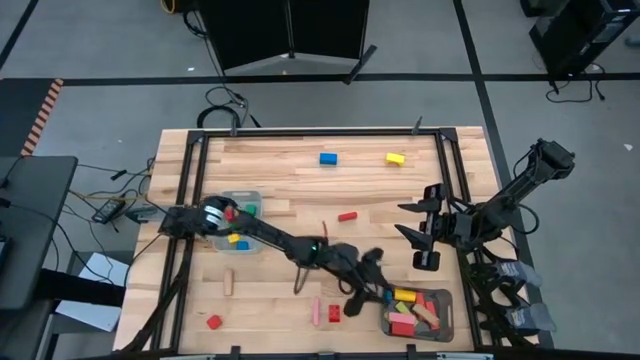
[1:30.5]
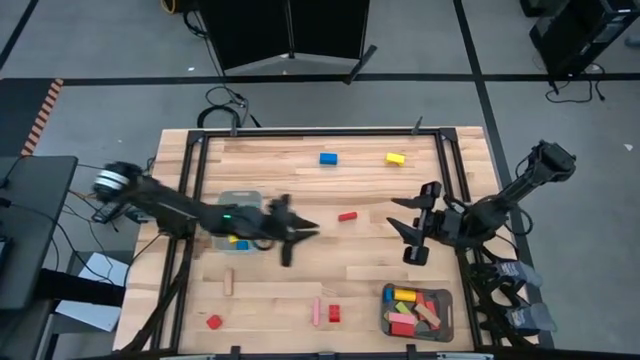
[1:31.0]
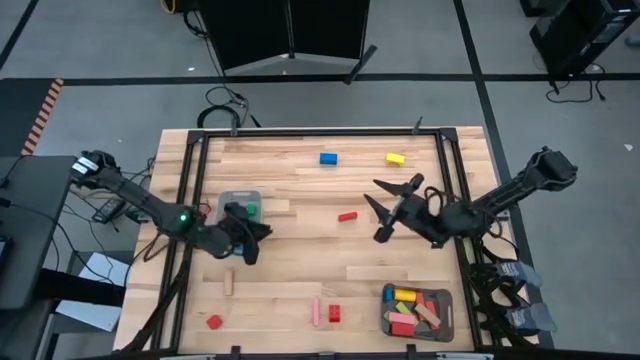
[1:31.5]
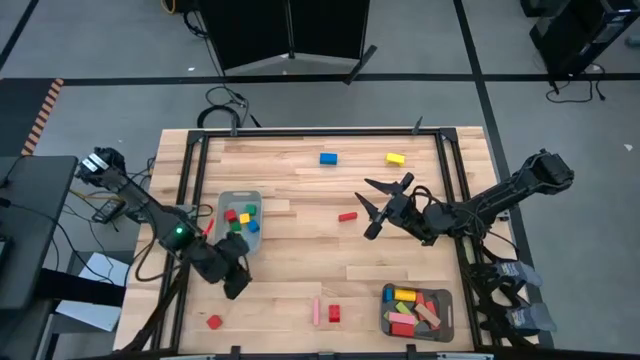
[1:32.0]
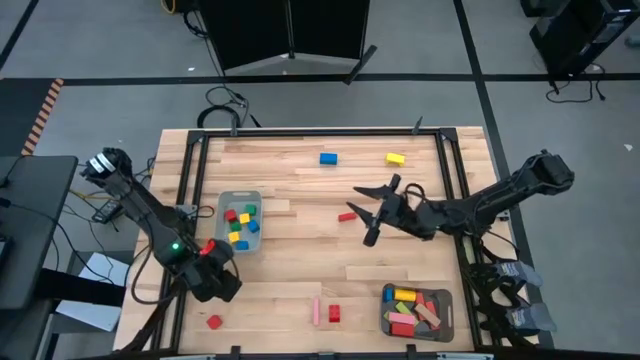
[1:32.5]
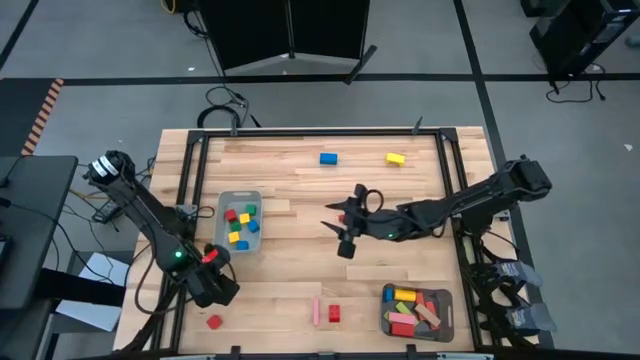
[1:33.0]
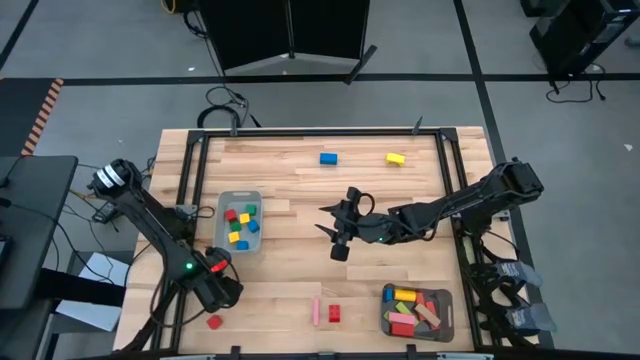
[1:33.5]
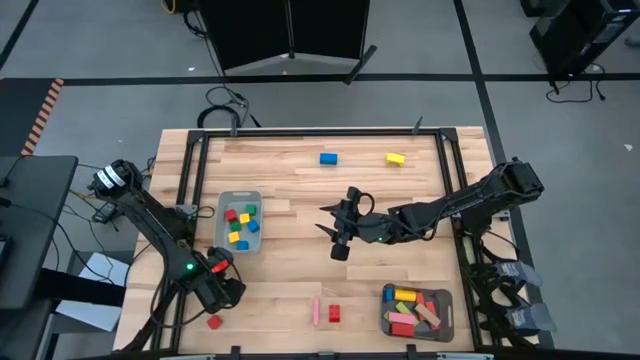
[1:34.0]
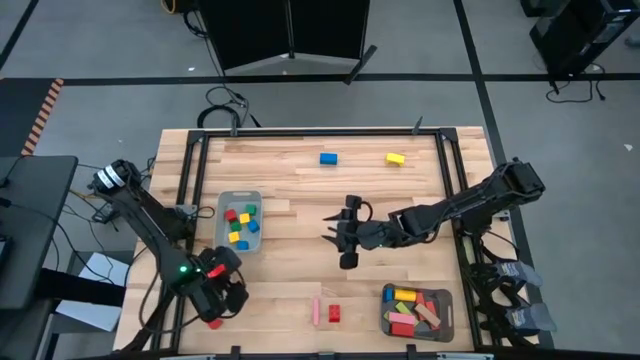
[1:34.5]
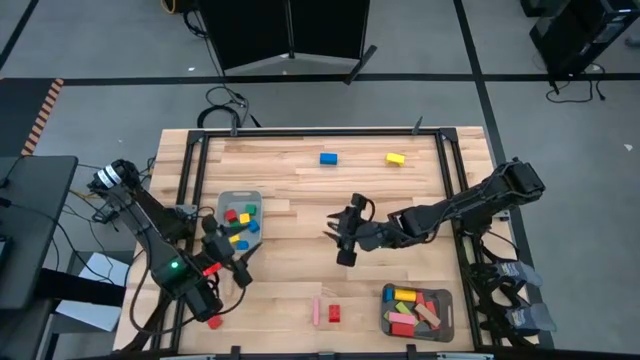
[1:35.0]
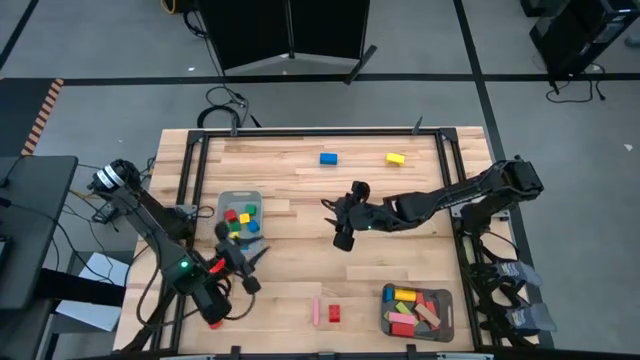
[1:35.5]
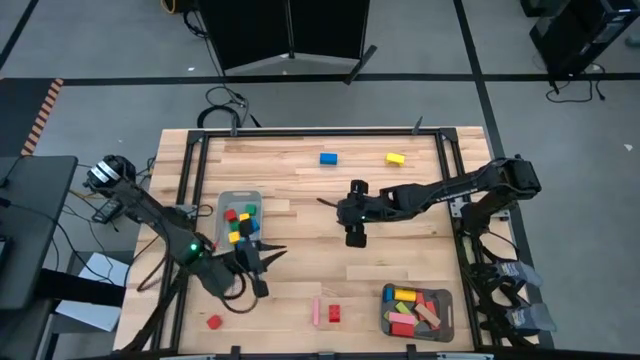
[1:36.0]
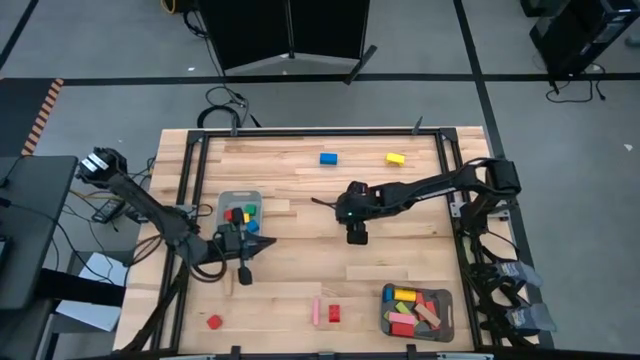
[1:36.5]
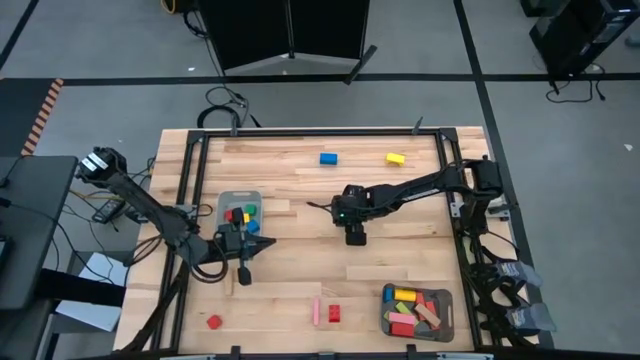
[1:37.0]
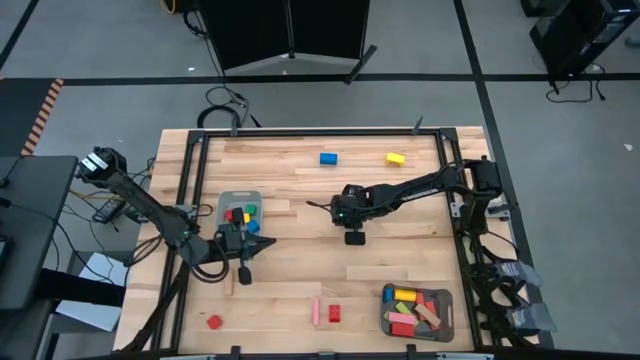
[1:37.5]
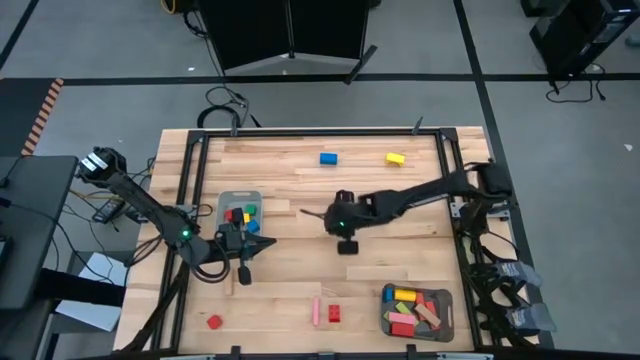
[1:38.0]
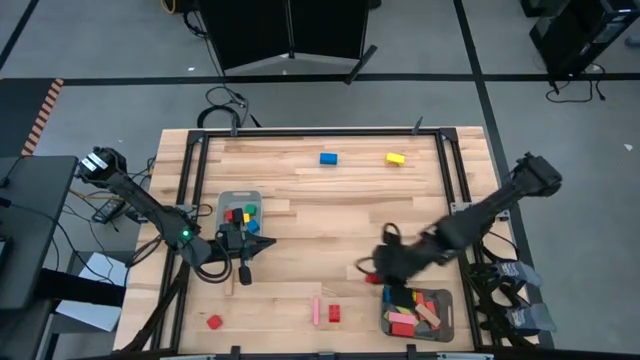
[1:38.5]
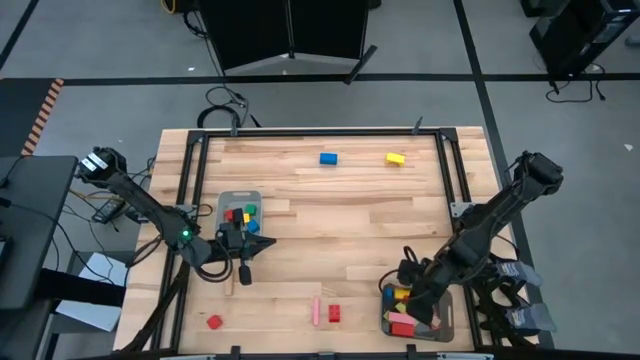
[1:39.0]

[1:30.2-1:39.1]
Task: Sort blocks by size
Put the orange block into the black bin

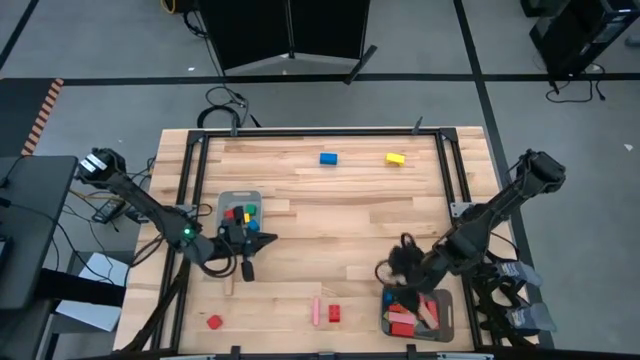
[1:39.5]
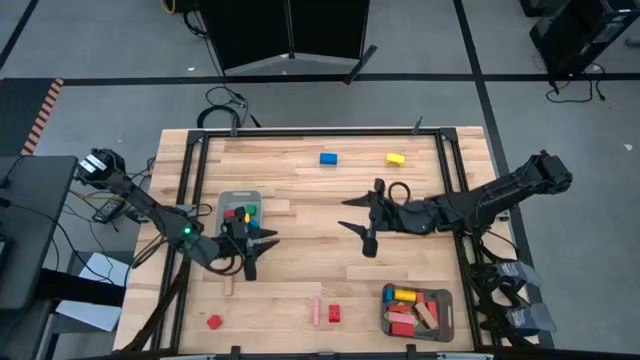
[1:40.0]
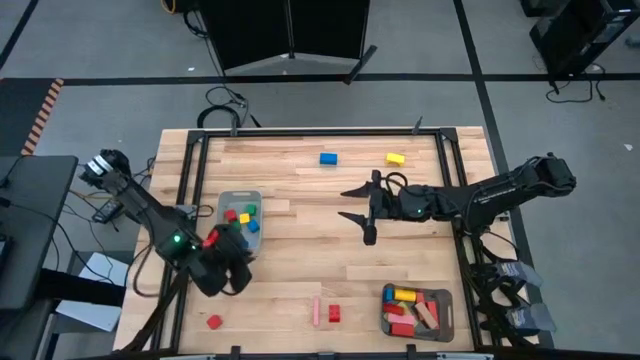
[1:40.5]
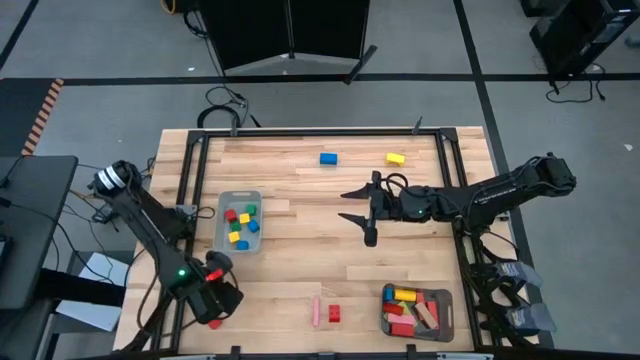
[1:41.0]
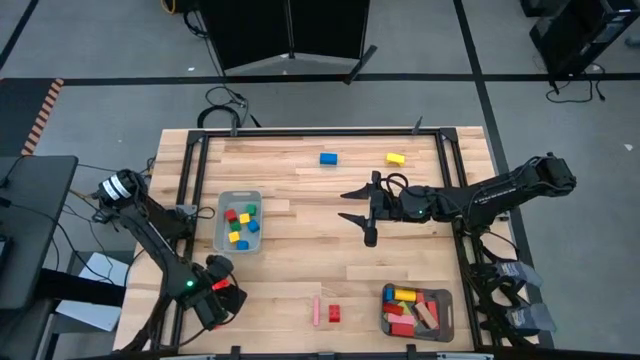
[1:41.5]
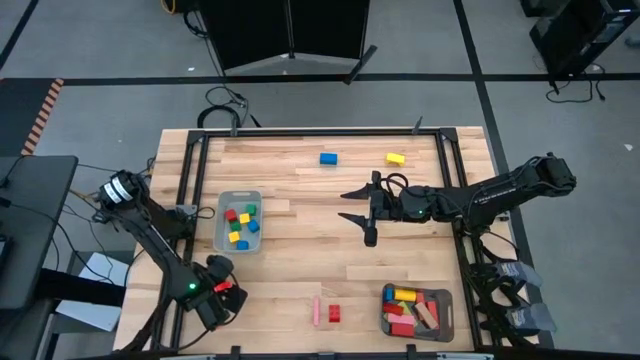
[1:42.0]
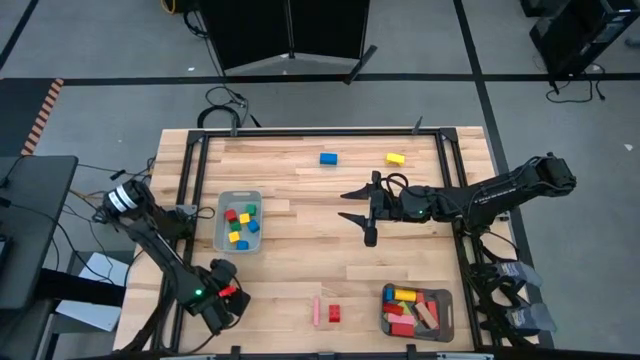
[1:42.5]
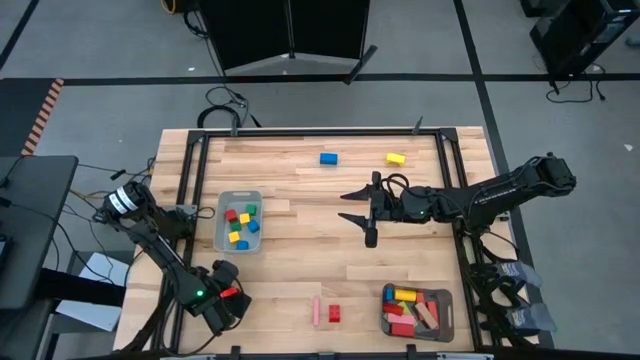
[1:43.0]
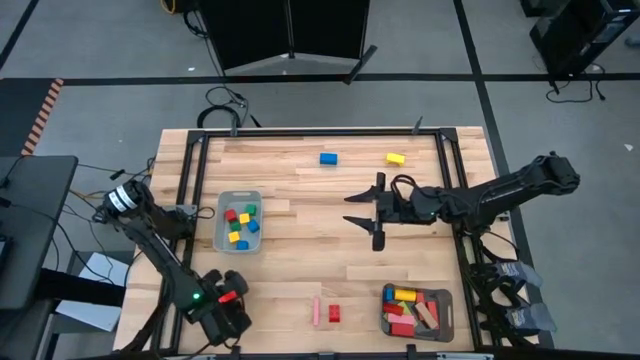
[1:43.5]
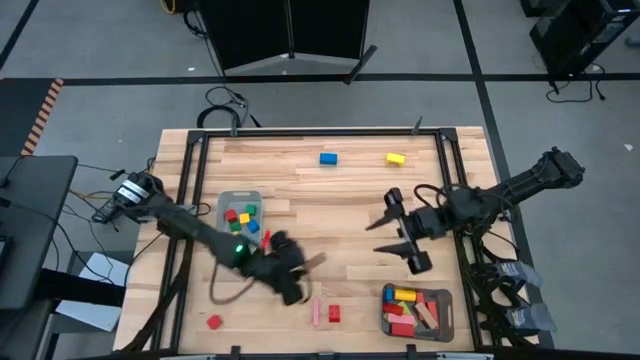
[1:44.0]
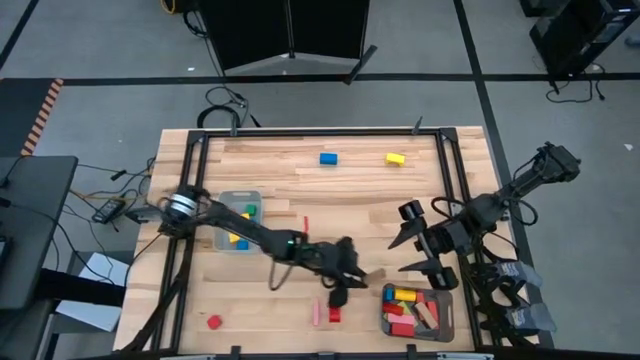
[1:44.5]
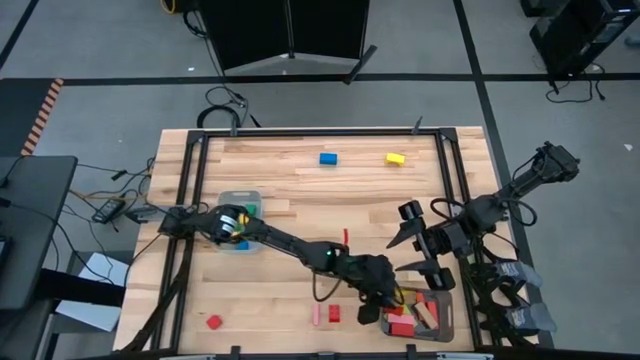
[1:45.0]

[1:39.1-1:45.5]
Put the brown block into the black bin

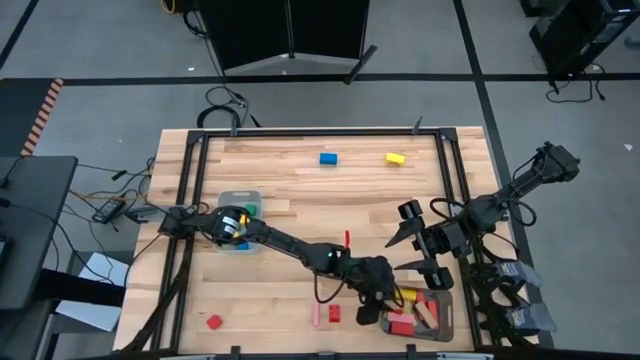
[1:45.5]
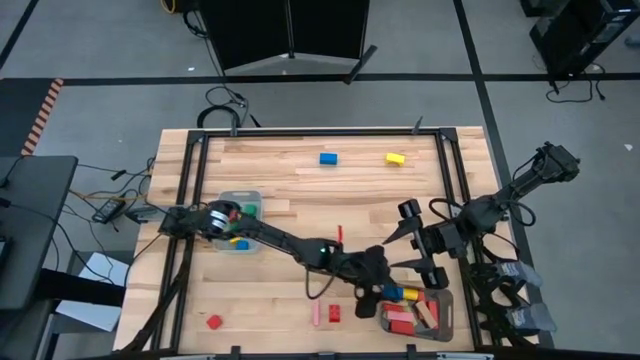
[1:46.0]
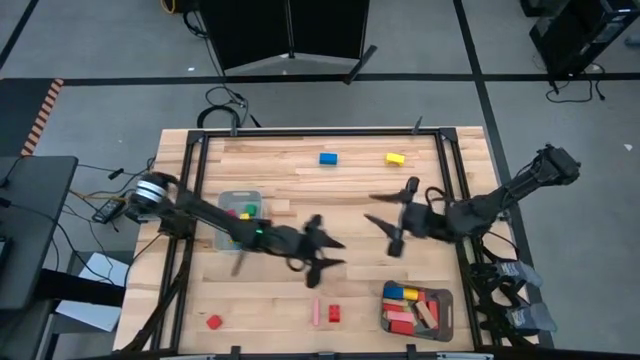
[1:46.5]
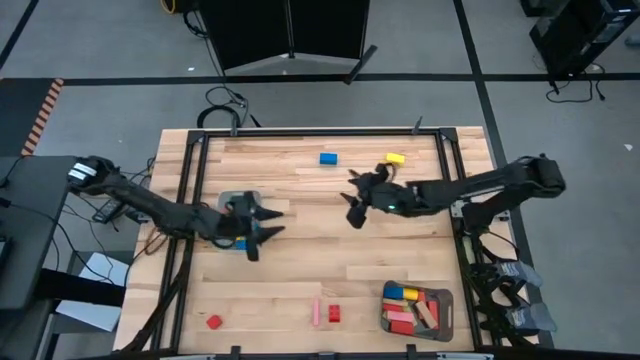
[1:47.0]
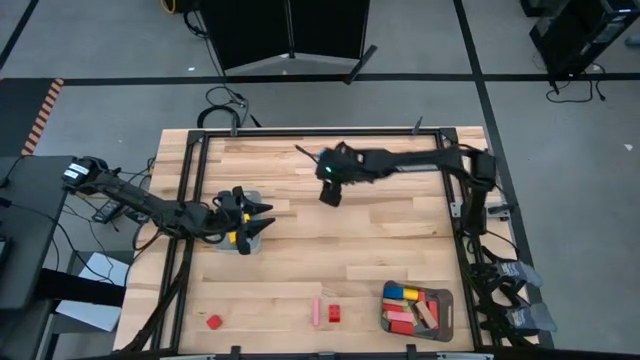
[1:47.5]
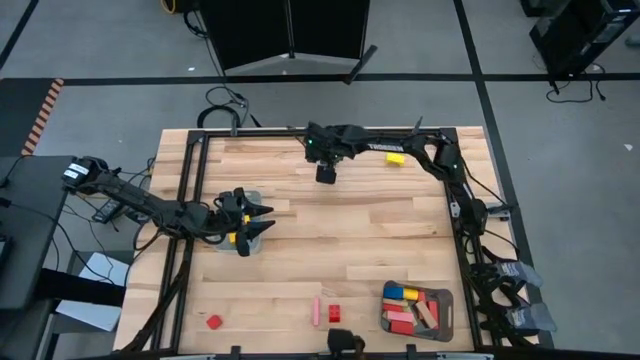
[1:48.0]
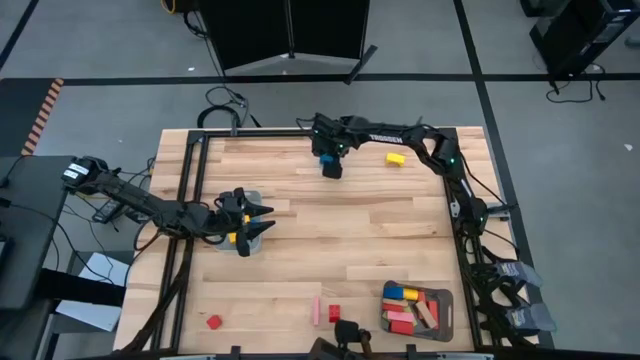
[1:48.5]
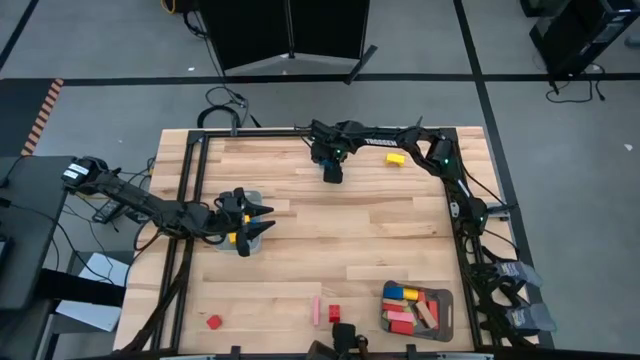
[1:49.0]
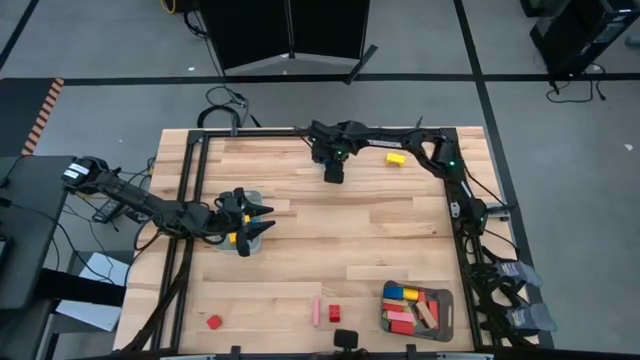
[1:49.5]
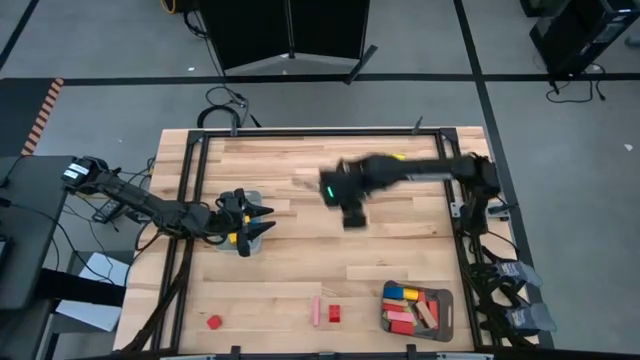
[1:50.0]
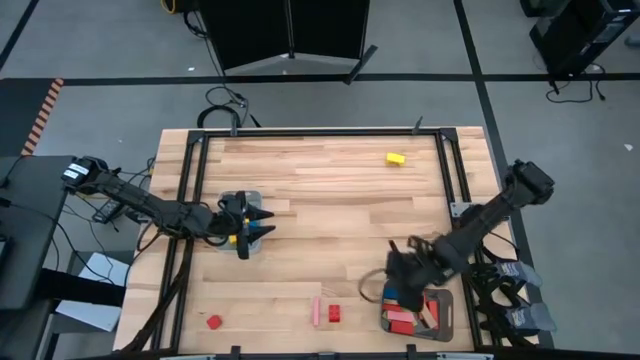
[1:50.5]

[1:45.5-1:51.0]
Put the blue block into the black bin

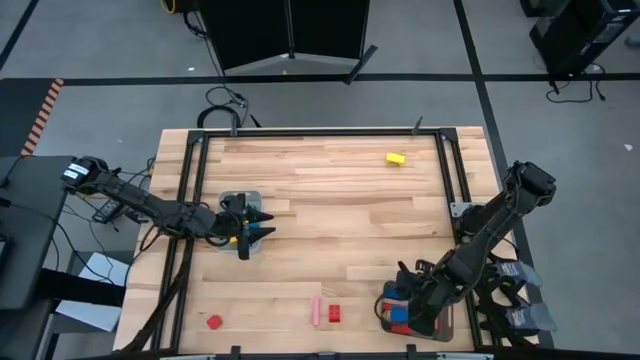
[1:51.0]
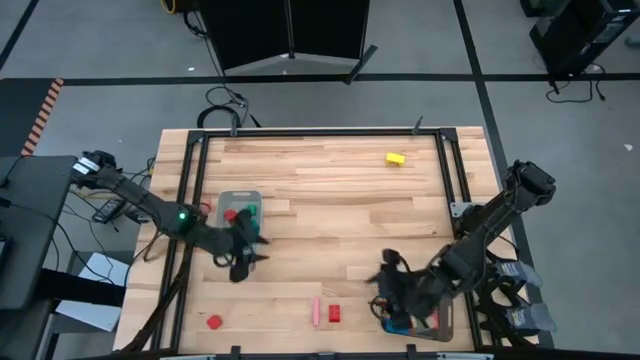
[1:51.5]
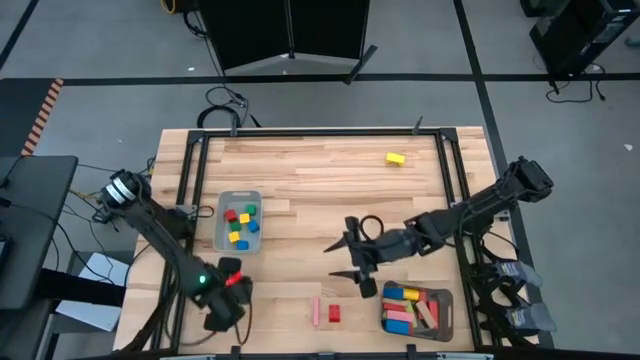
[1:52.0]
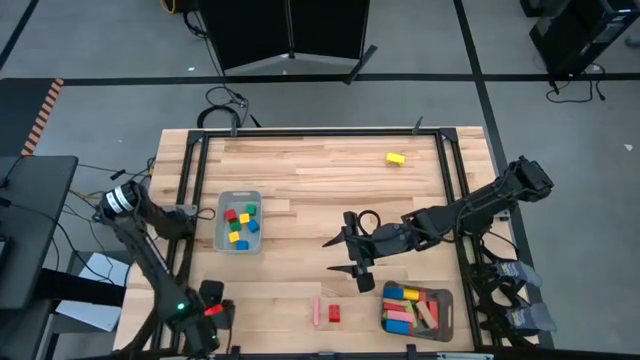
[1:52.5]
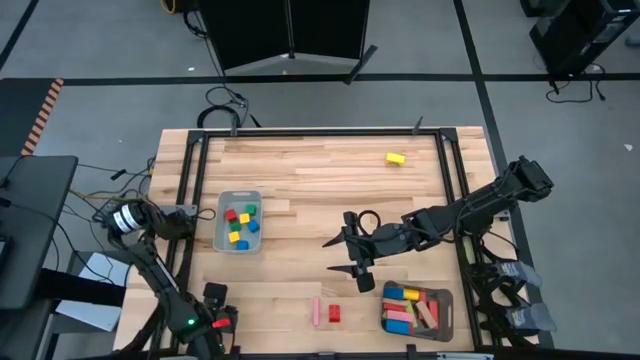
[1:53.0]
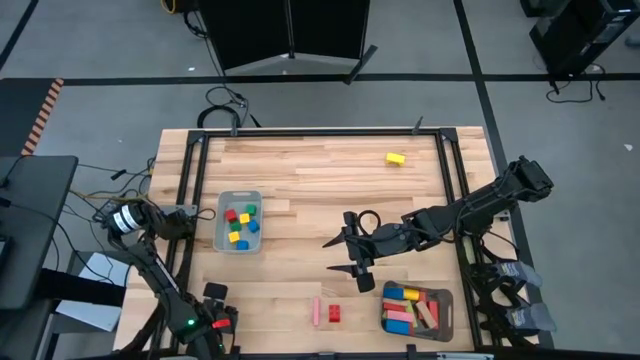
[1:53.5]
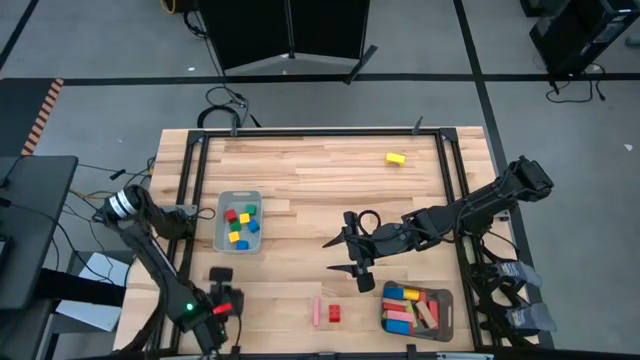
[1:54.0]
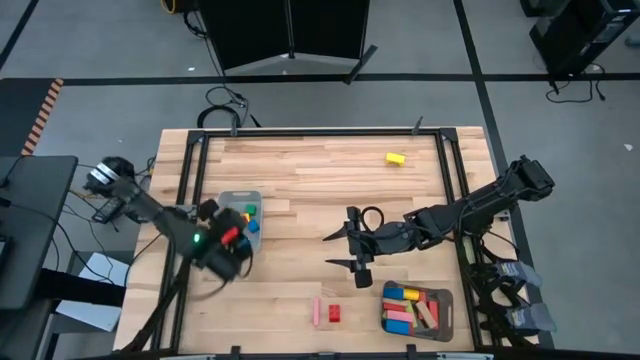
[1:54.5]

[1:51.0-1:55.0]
Put the left red block into the grey bin
